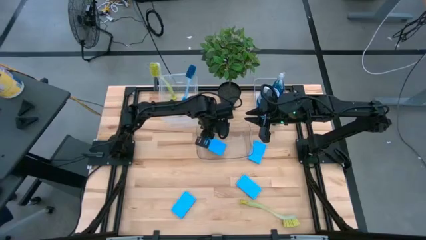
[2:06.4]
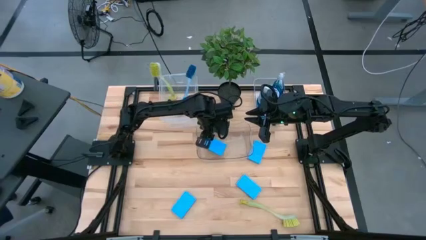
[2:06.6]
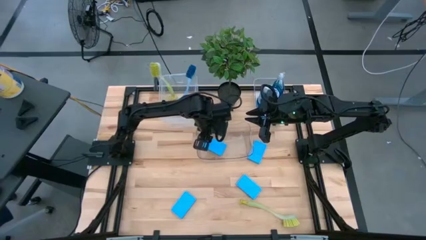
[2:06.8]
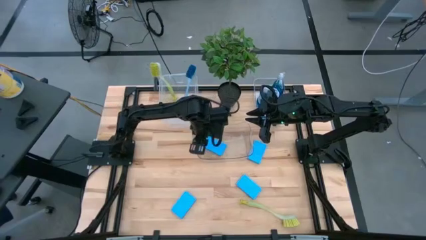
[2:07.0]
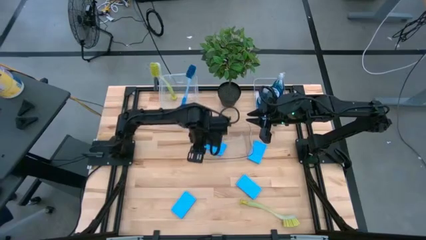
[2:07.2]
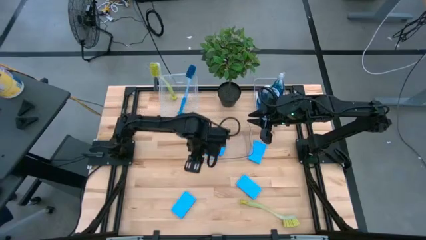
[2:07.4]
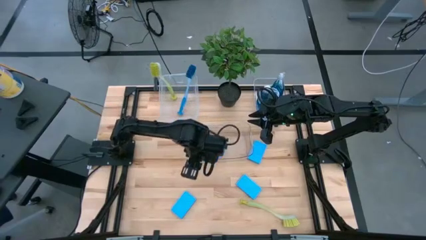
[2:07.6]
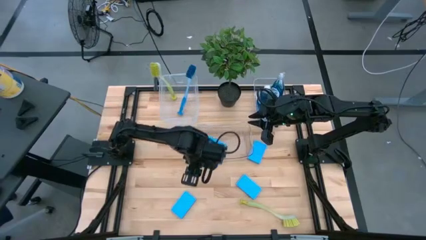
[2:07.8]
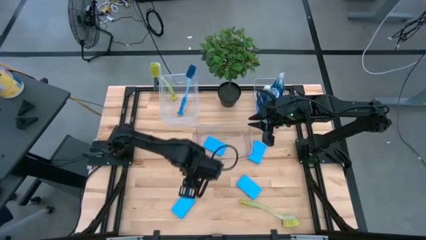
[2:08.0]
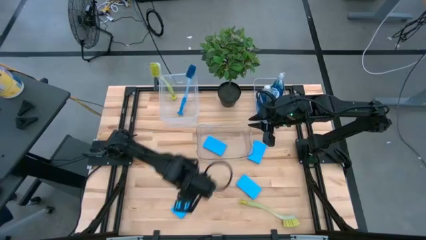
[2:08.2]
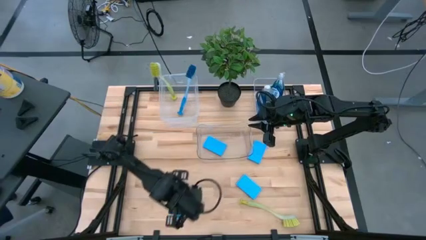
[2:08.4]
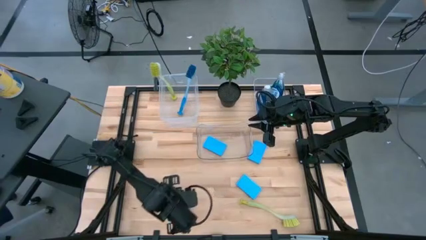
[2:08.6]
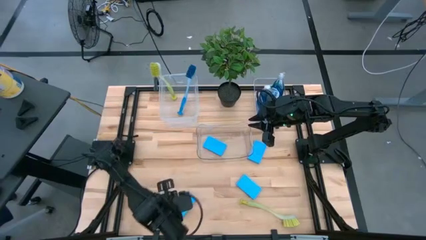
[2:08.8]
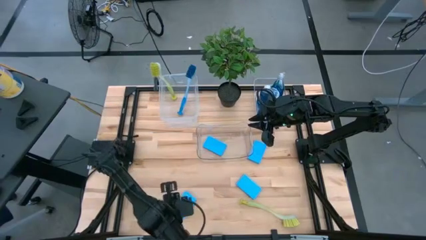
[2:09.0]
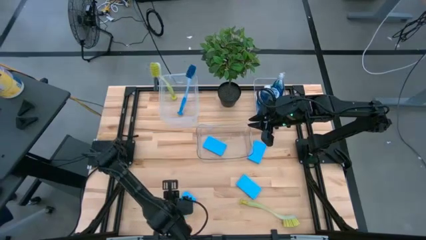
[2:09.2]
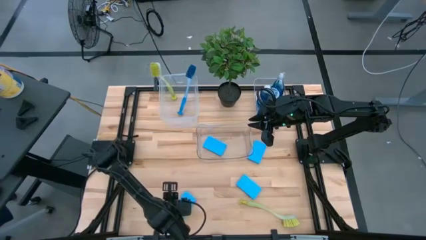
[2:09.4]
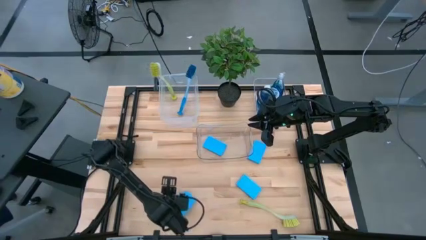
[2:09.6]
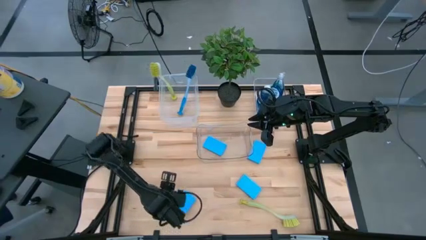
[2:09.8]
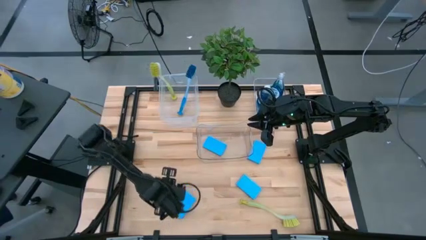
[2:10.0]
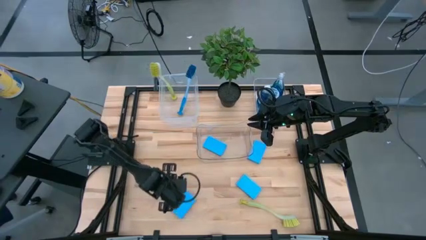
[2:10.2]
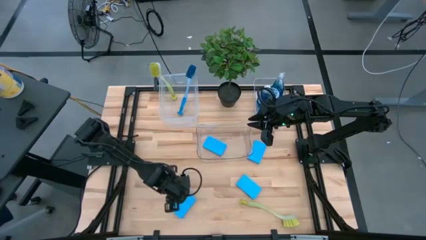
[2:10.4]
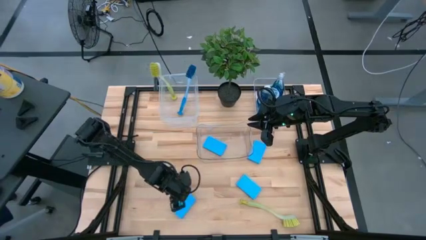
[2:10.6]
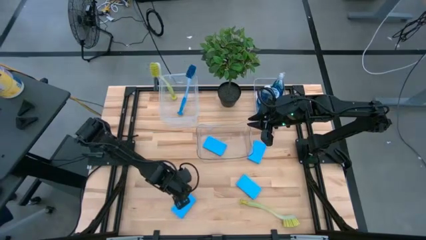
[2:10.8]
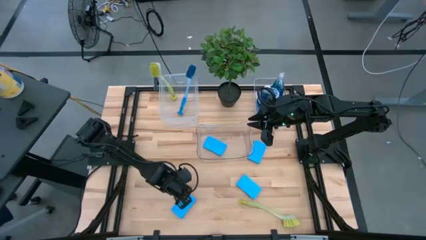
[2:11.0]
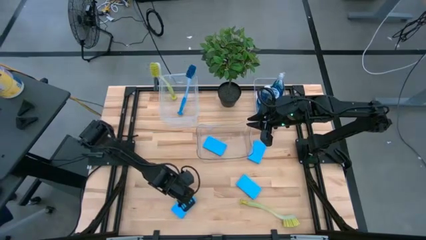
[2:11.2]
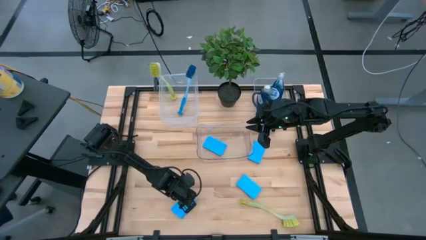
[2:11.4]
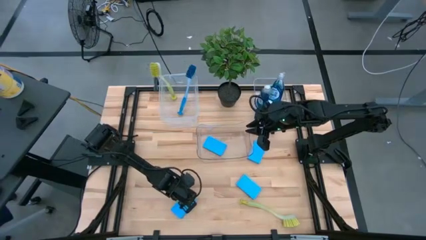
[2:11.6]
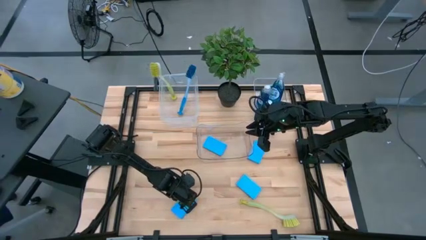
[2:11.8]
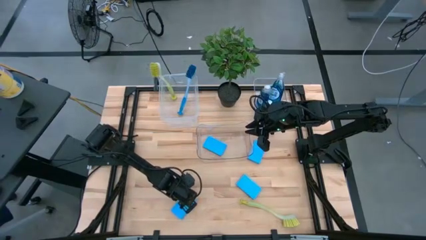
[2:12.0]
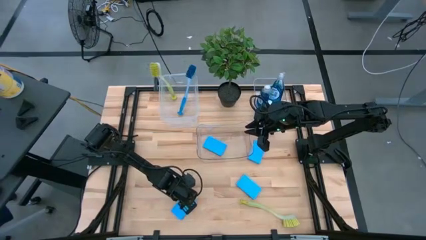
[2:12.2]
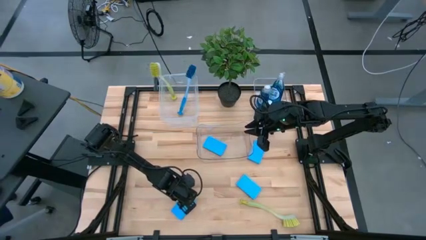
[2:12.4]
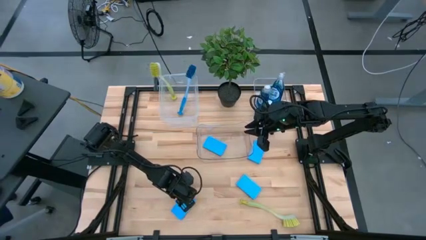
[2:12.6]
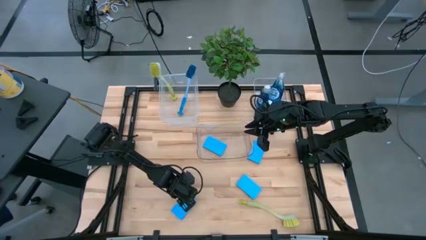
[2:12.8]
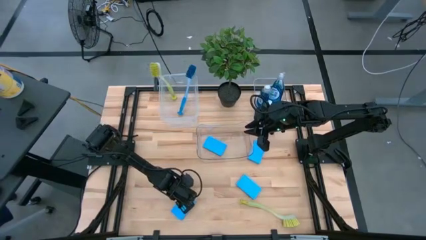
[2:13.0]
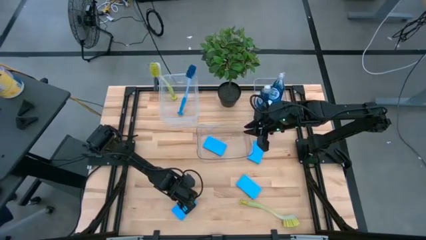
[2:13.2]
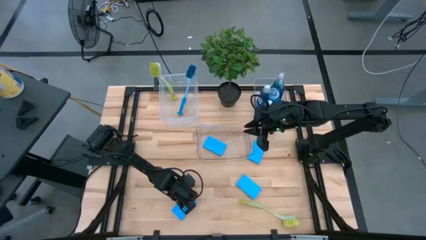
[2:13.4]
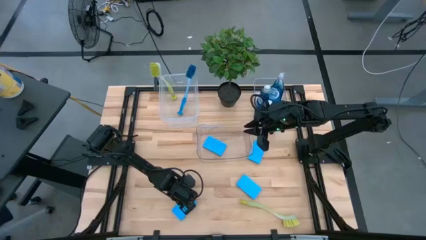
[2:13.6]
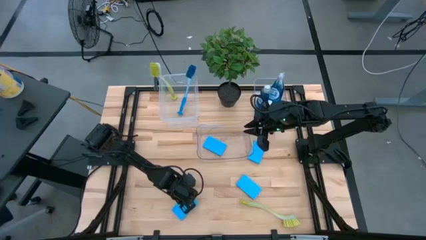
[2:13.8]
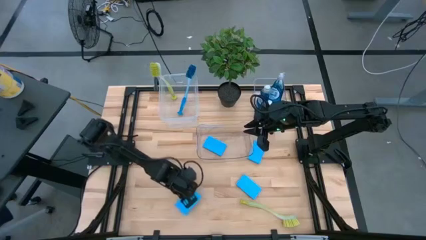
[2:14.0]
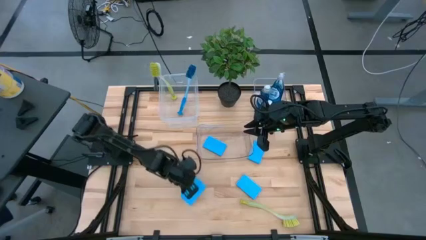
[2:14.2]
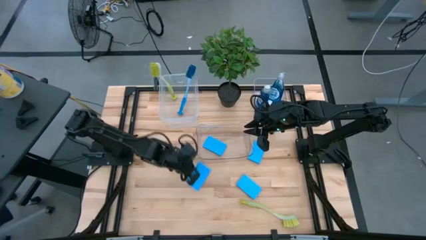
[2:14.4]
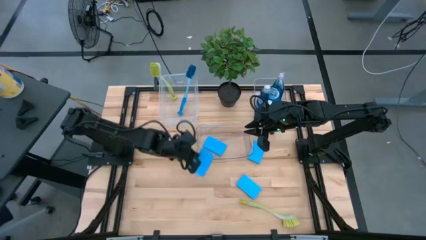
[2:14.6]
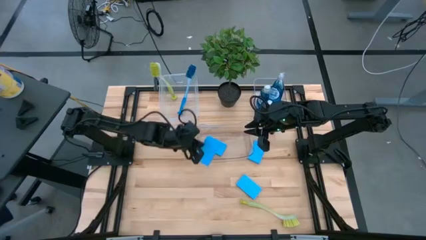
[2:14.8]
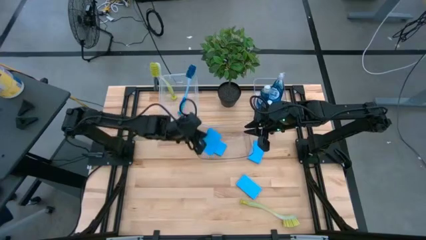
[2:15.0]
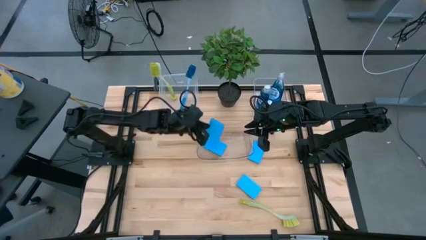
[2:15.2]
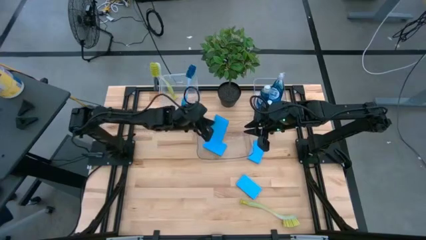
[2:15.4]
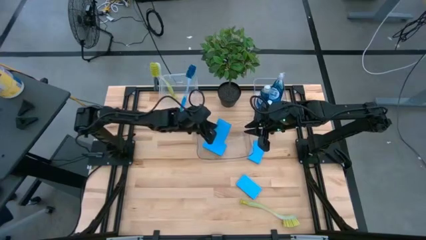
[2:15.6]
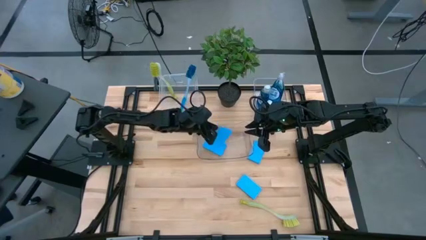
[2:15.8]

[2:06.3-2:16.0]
Task: Pick & Place Kitchen Sink Supplies
Put the blue sponge into the bottom transparent bin

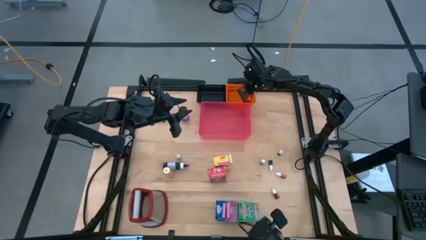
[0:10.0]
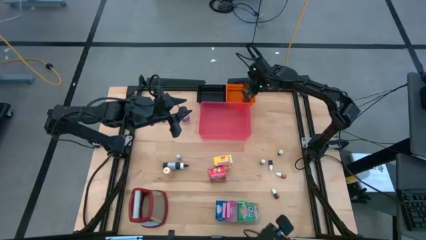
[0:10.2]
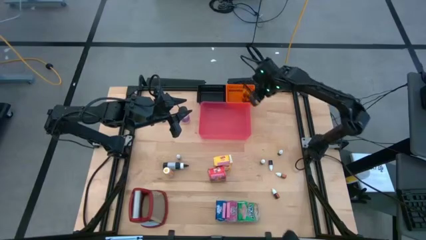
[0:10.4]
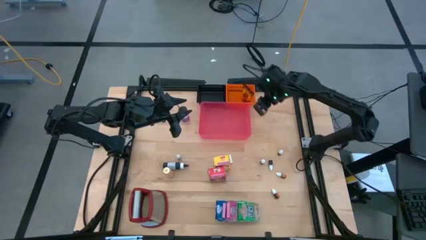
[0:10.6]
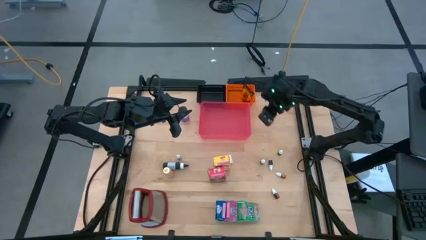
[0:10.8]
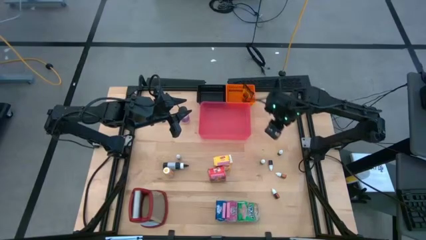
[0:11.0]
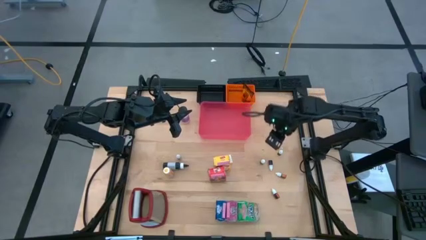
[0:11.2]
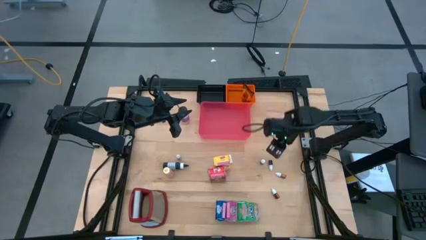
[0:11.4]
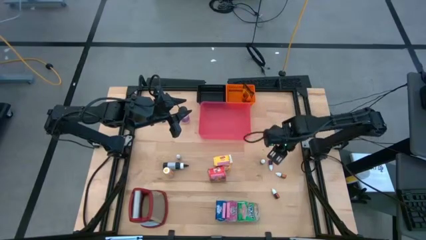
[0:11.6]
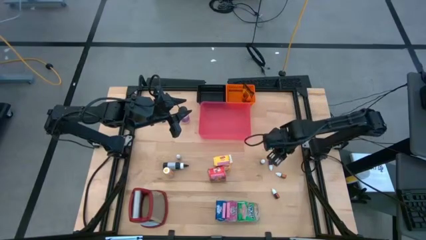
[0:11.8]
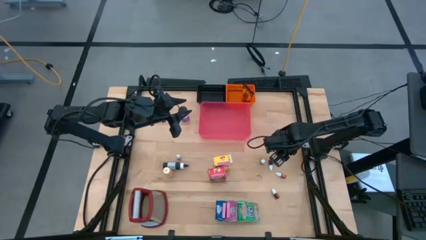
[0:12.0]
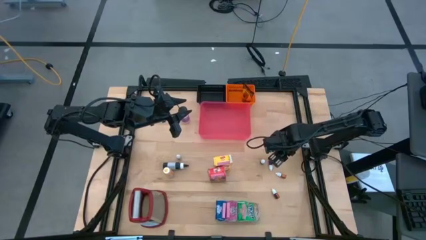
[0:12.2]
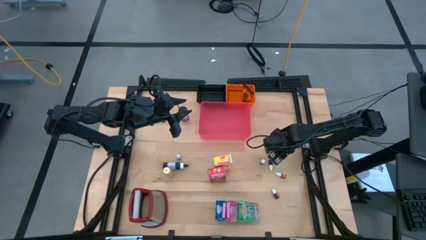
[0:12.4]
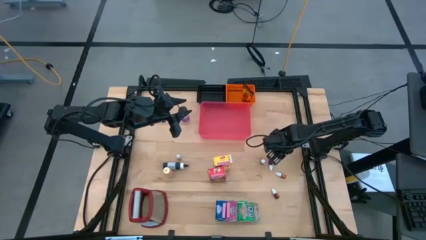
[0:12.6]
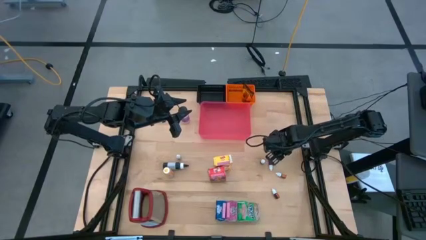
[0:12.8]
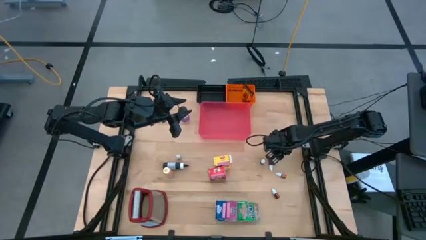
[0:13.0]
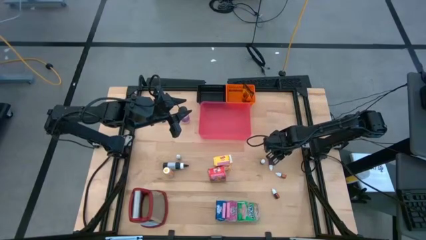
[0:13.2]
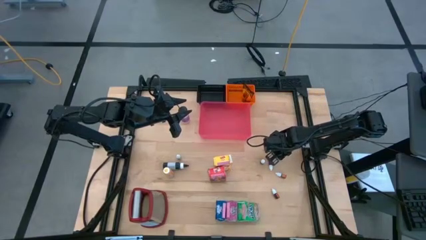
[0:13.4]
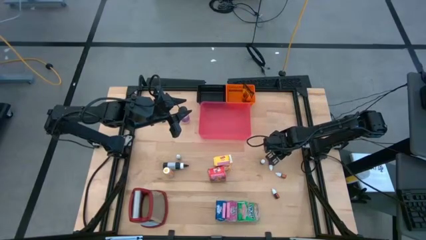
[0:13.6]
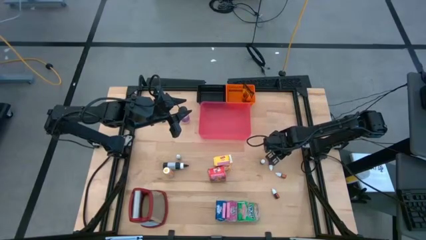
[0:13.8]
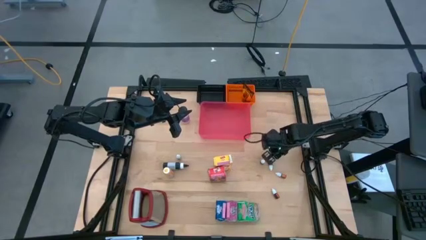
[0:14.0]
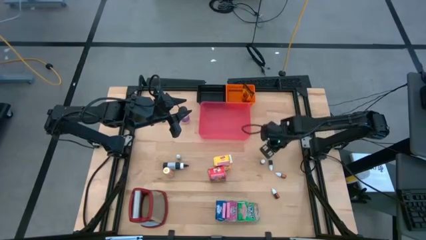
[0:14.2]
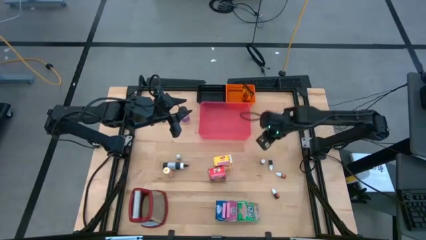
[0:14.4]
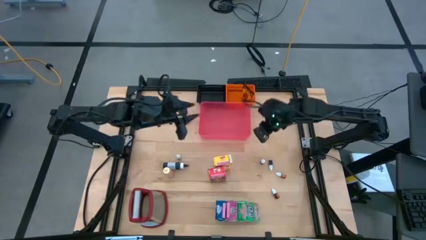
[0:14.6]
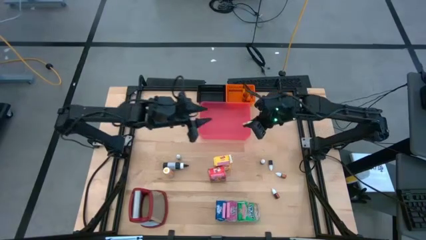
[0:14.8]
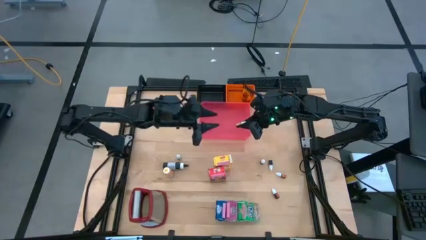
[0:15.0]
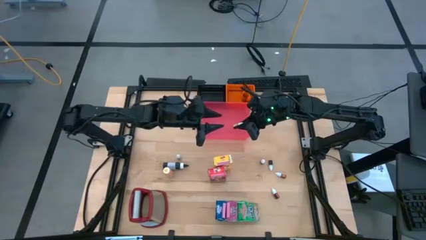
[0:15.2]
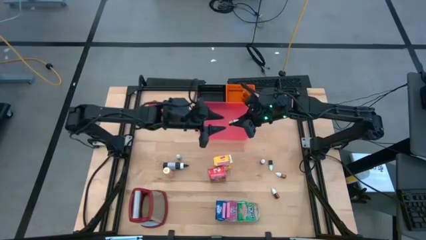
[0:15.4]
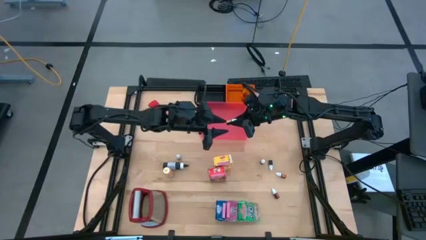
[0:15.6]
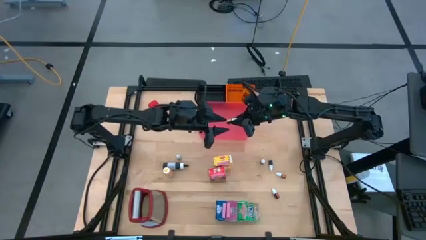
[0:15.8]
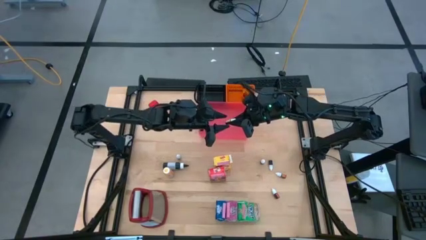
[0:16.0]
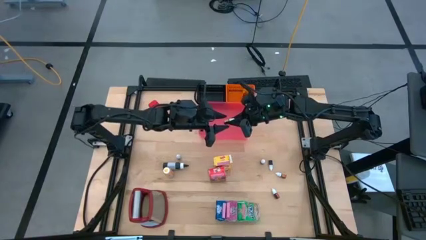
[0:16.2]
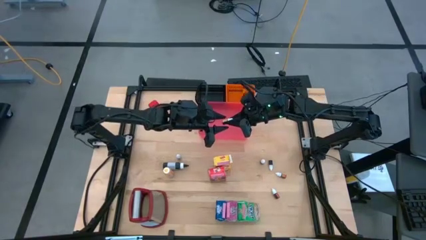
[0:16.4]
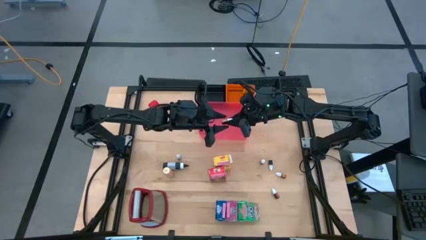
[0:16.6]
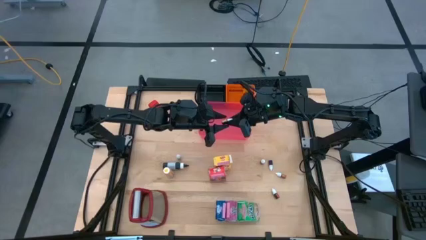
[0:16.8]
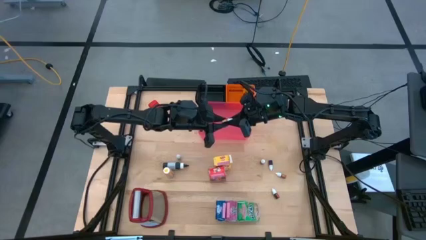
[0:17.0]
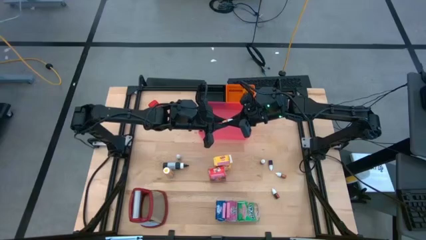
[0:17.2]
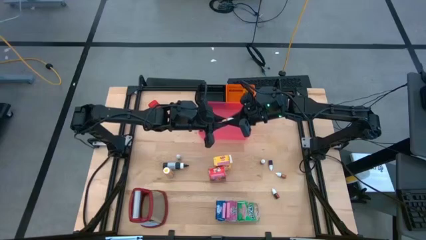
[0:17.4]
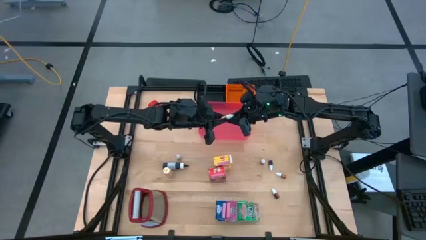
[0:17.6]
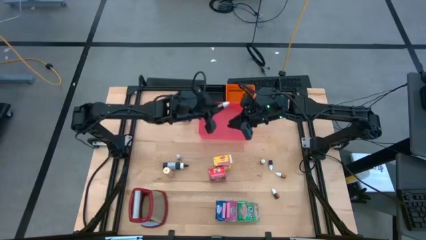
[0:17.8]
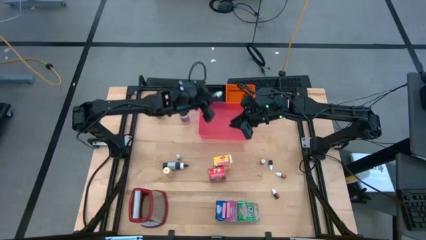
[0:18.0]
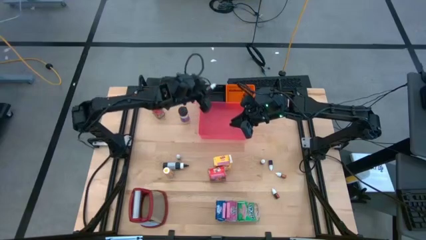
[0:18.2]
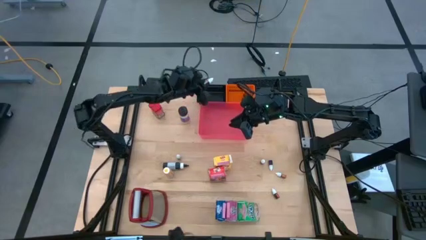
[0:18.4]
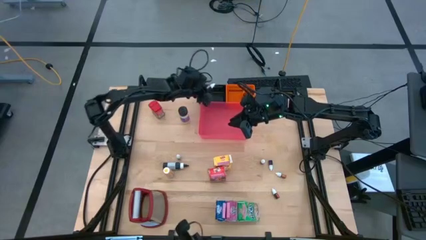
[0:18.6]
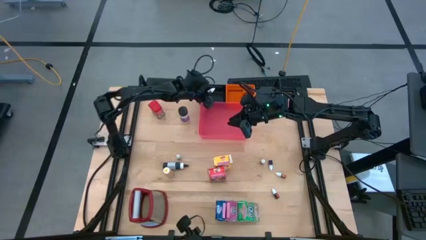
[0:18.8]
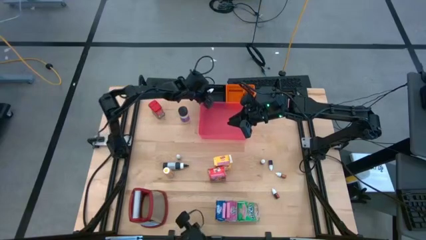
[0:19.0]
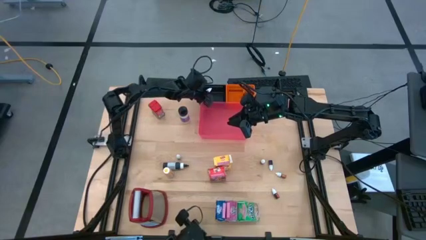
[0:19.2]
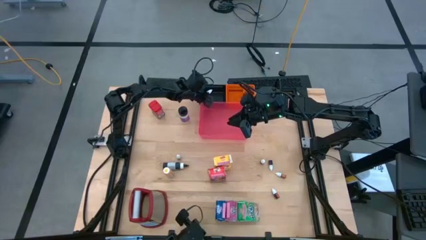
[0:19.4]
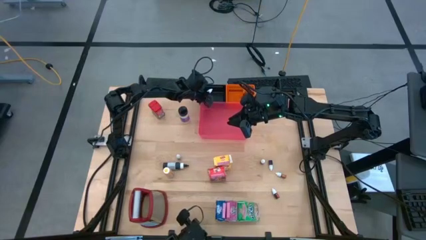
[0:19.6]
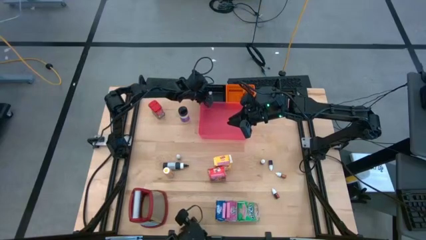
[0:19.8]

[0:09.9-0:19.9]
Task: Pick & Place Kitchen Items
Put the small yellow food coloring bottle into the black bin
